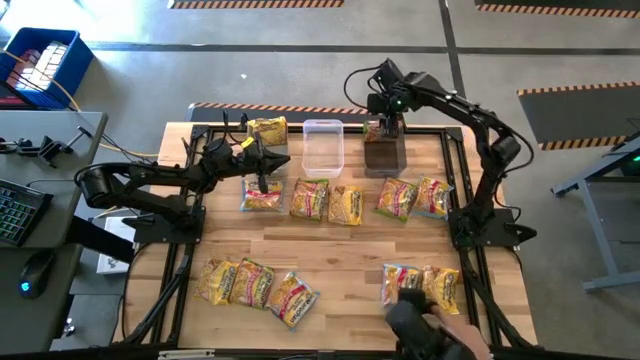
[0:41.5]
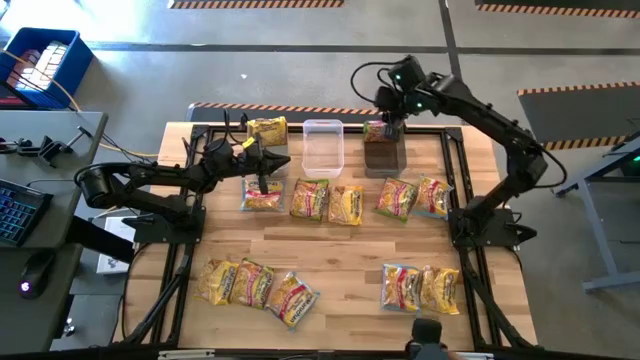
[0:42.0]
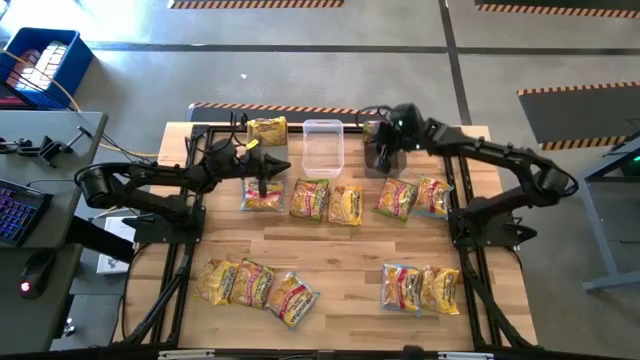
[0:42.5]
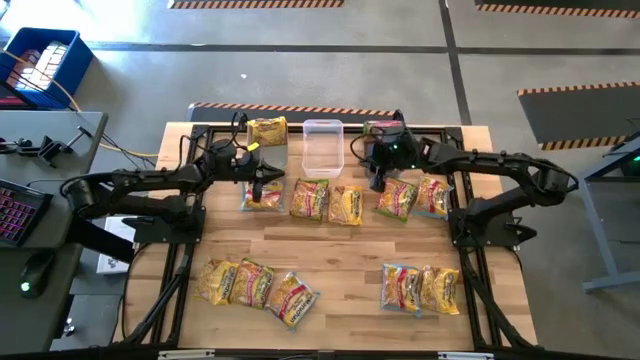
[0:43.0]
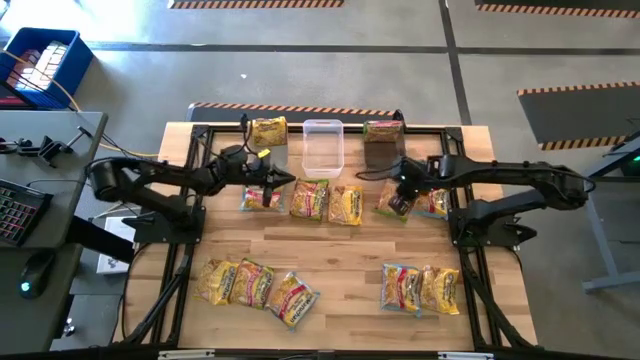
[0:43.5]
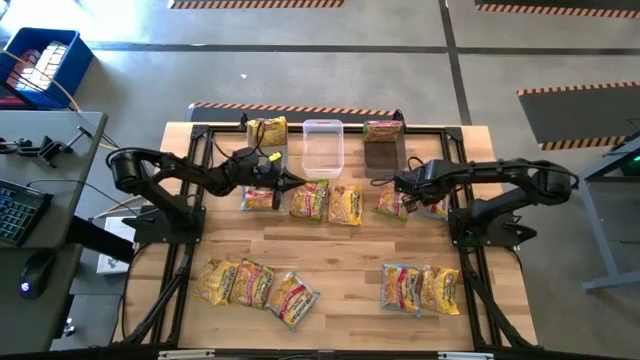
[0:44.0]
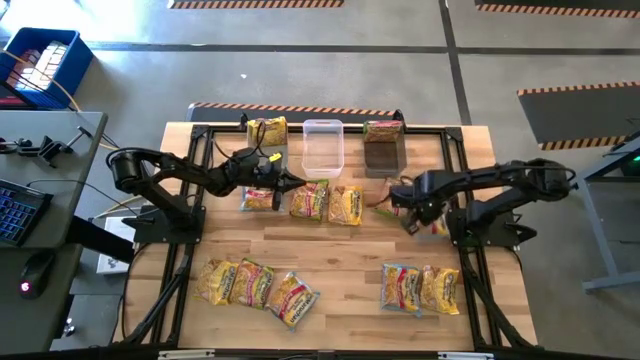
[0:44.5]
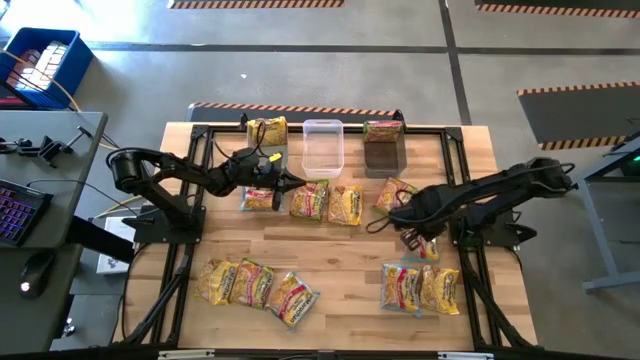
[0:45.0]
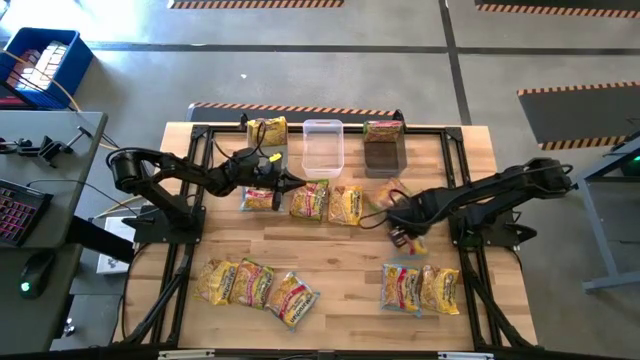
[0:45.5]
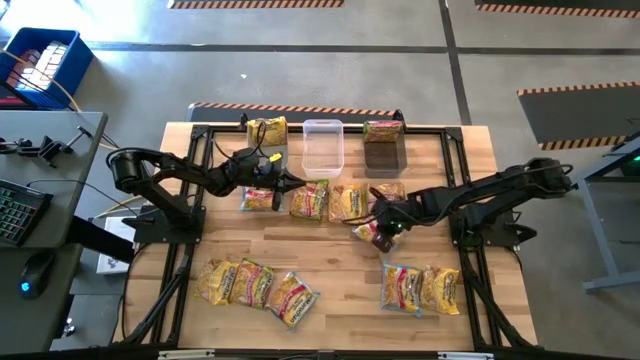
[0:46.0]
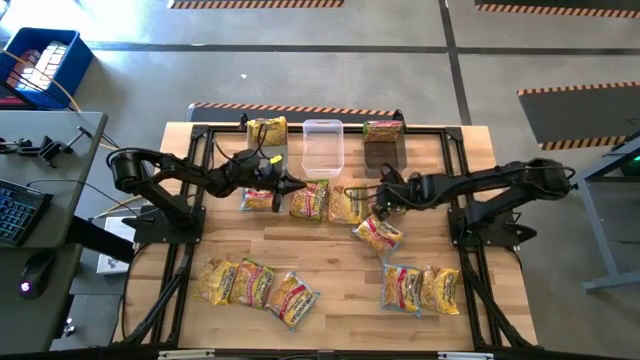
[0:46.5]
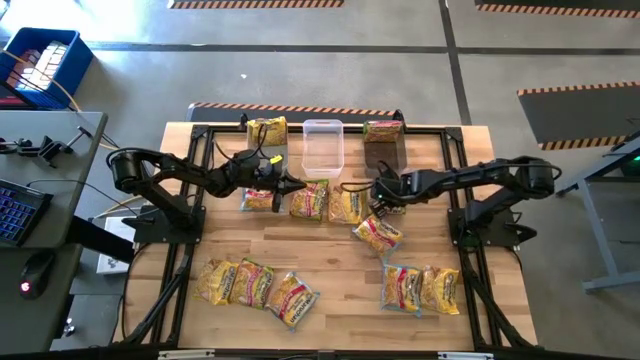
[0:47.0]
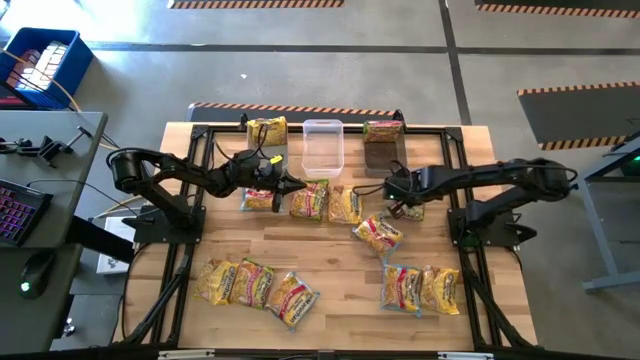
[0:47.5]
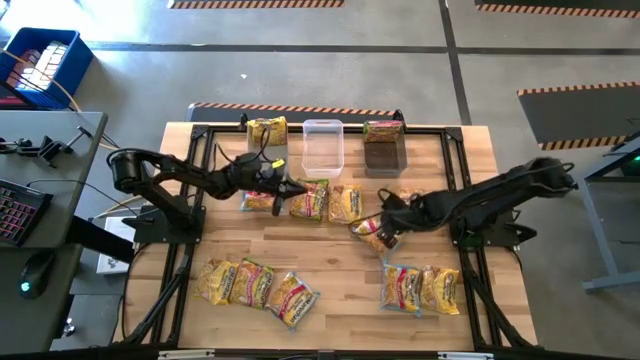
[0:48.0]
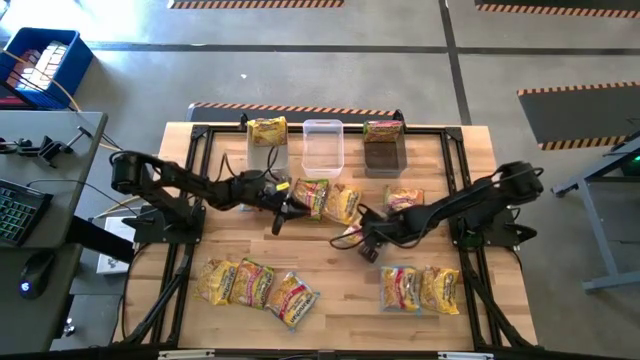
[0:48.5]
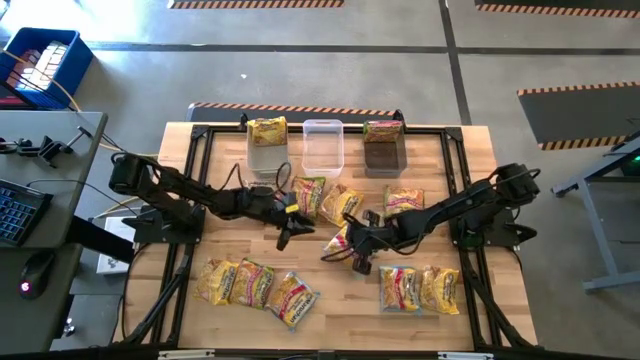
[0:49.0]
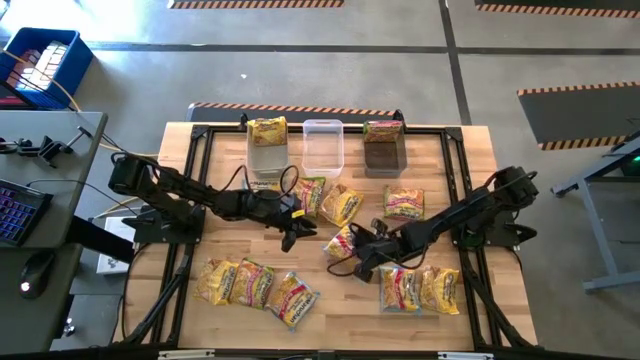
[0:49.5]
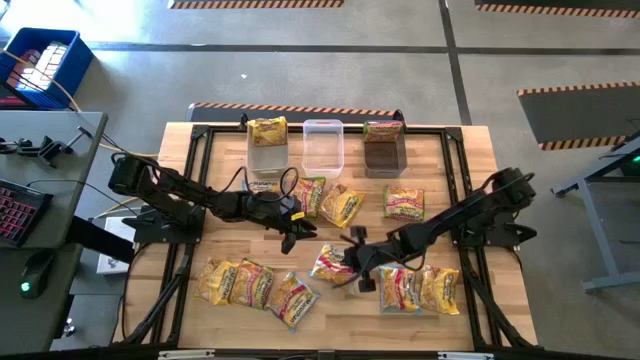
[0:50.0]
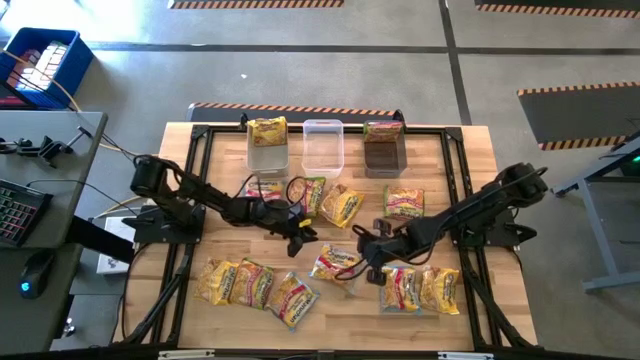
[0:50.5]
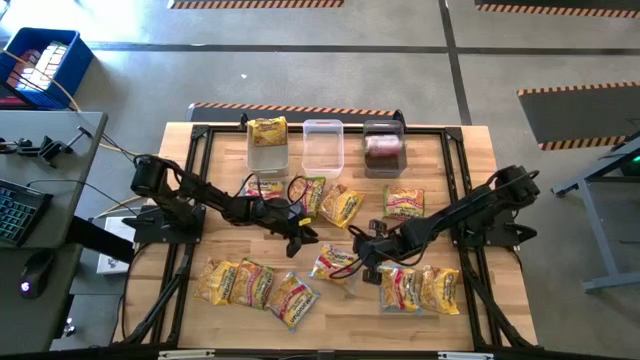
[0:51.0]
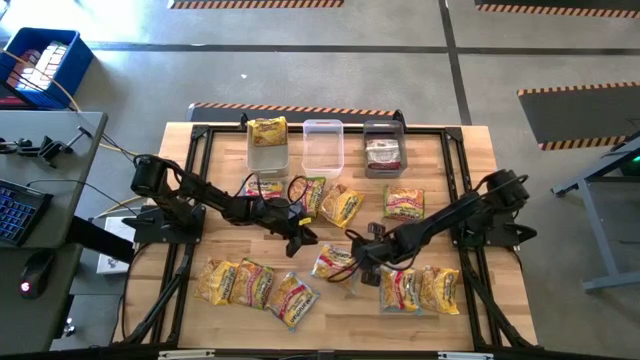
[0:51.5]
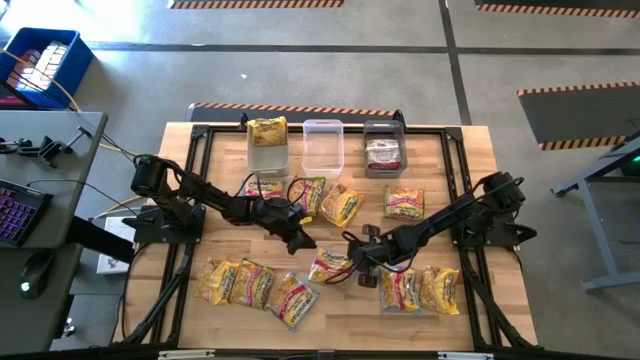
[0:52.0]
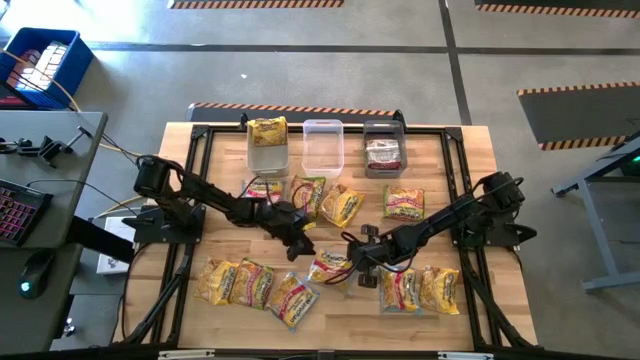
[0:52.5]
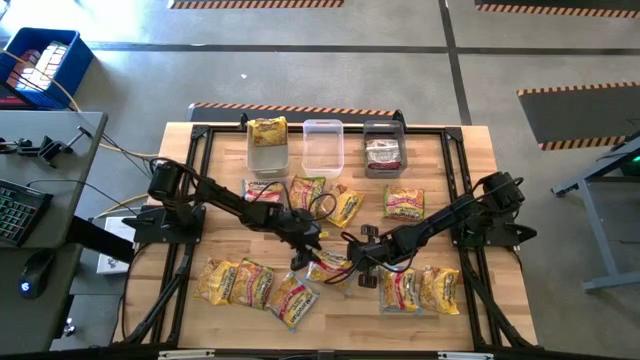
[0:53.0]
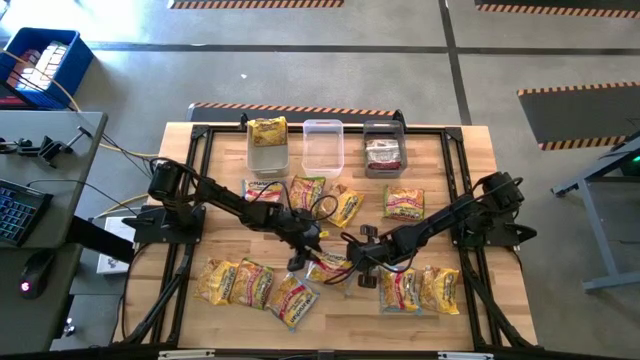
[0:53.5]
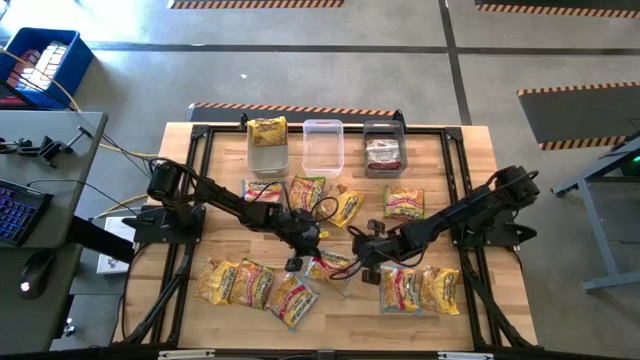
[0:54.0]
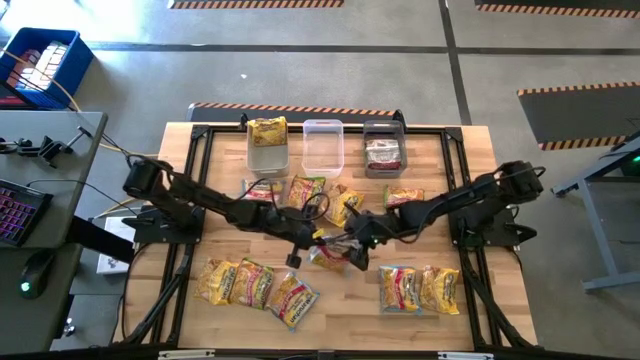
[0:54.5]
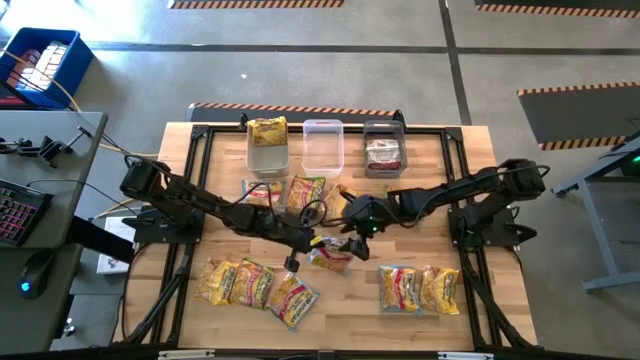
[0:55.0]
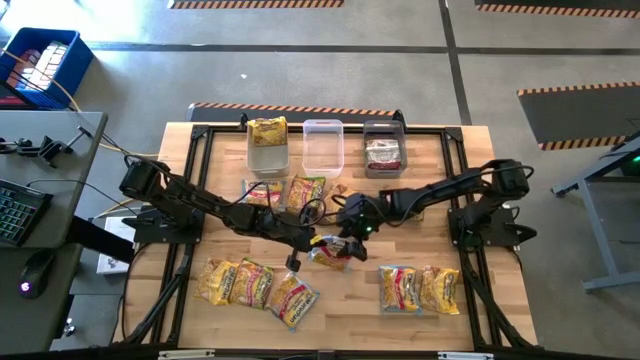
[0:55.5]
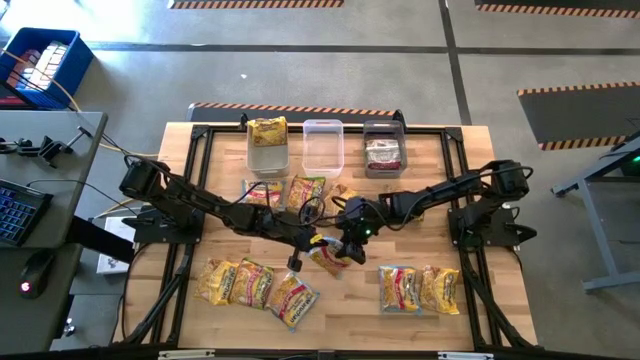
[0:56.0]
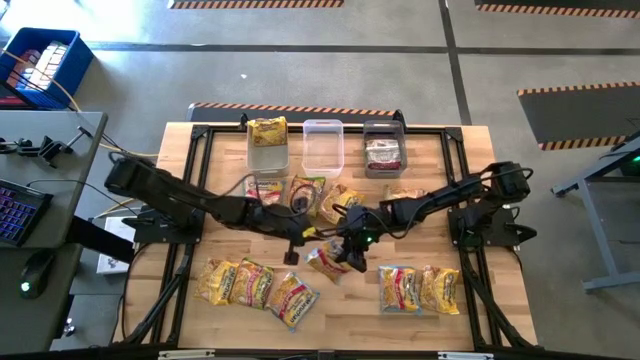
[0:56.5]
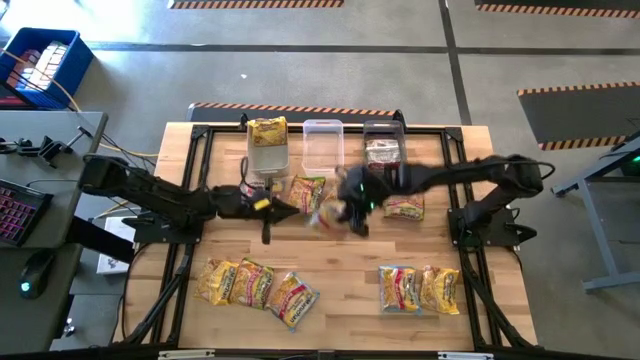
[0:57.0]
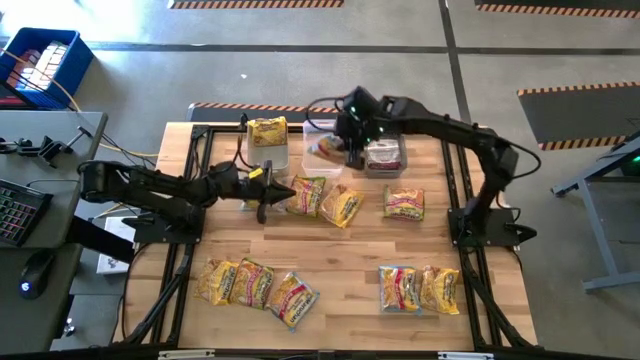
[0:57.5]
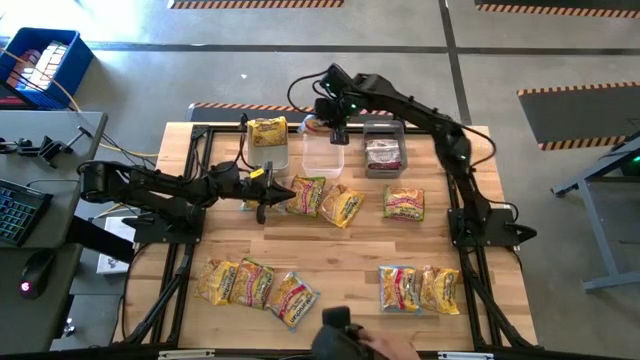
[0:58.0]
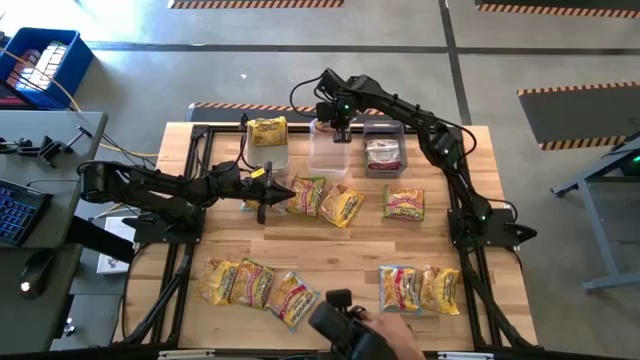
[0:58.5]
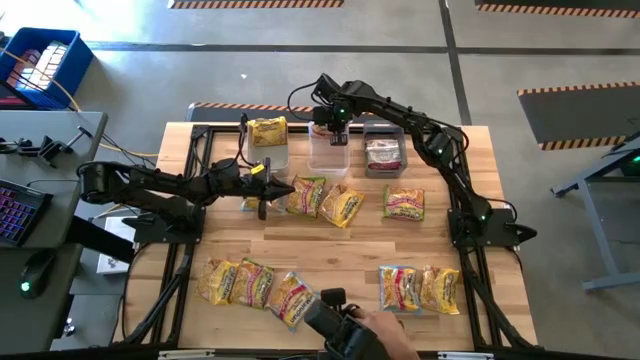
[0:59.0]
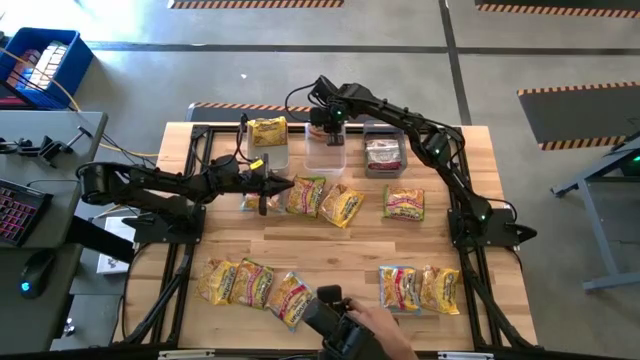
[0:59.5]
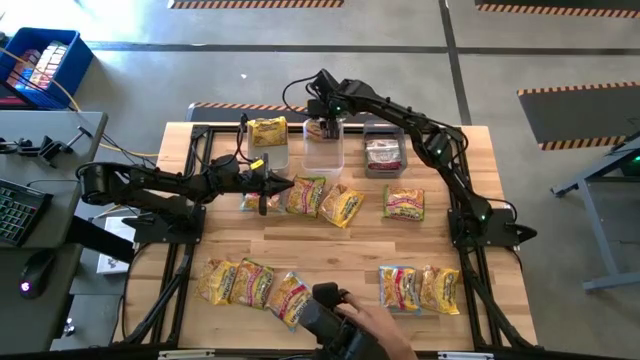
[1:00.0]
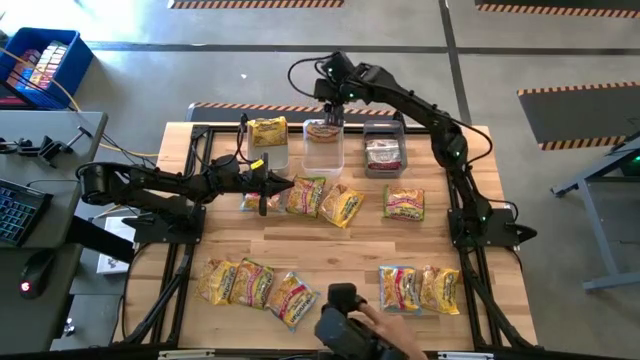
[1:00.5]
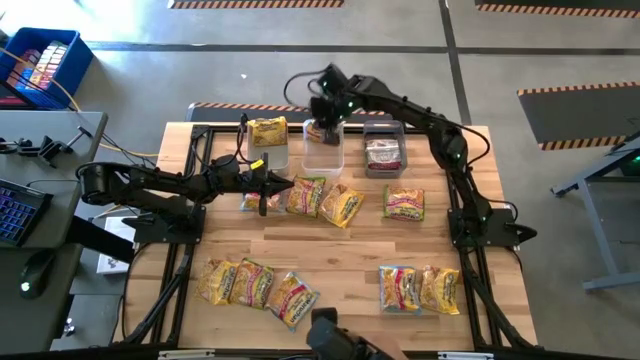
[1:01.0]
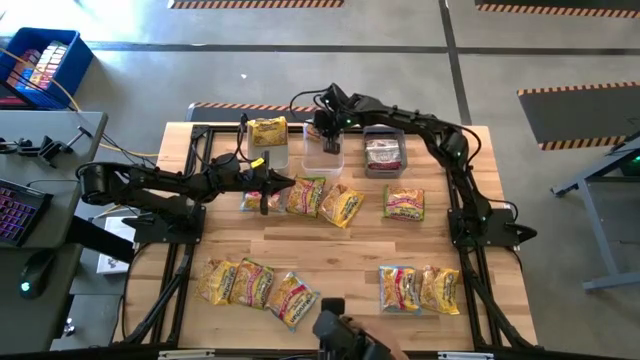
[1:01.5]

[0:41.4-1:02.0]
Task: Sort Maruchan noodles
Put the middle blue noodle pack into the transparent white bin
